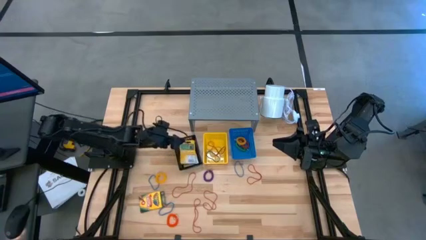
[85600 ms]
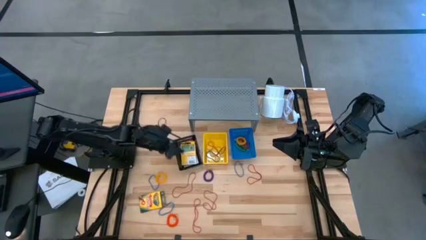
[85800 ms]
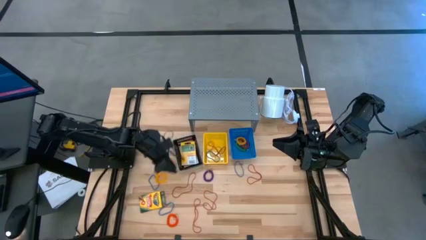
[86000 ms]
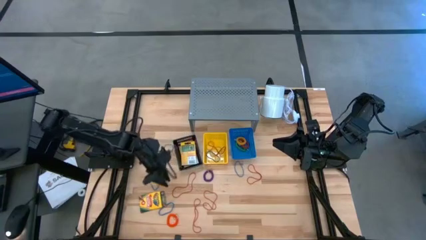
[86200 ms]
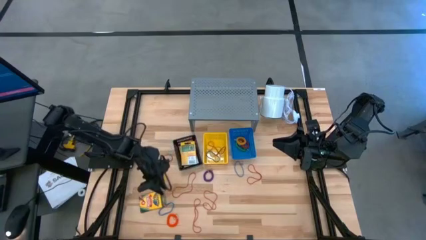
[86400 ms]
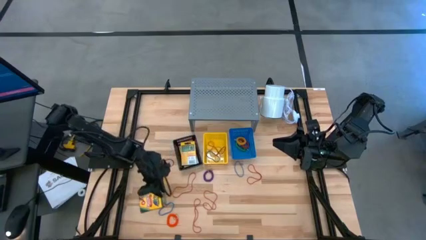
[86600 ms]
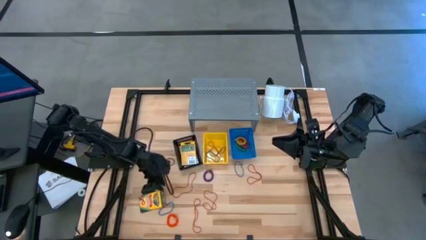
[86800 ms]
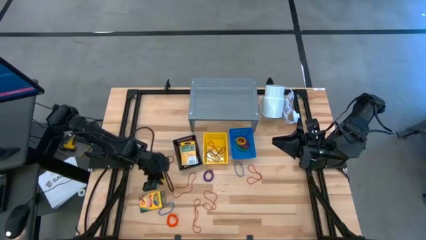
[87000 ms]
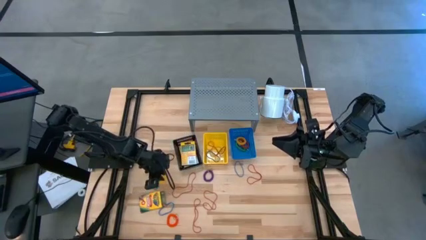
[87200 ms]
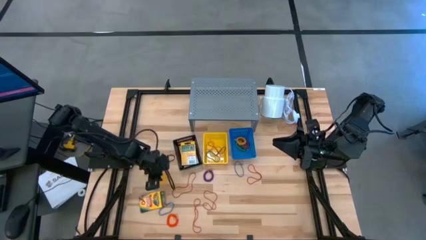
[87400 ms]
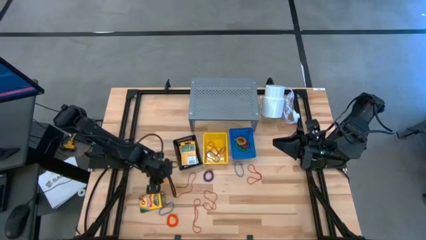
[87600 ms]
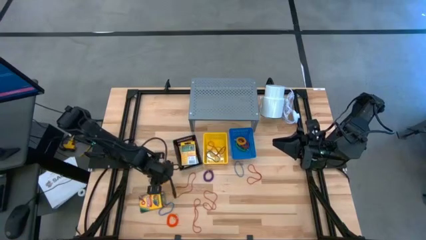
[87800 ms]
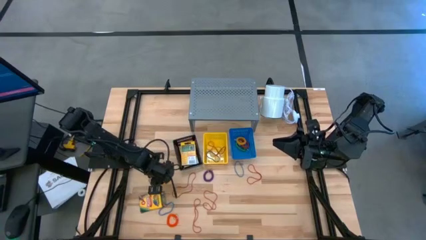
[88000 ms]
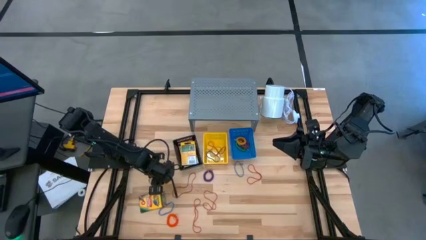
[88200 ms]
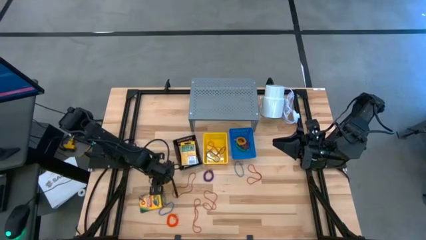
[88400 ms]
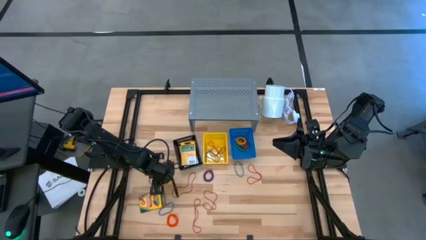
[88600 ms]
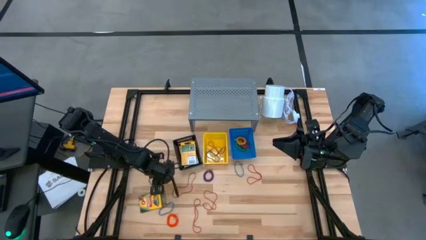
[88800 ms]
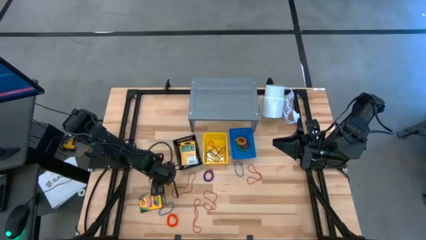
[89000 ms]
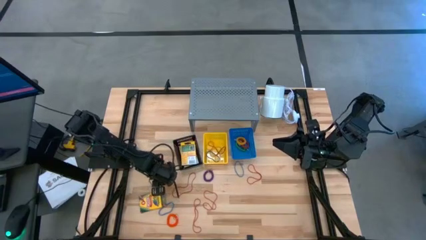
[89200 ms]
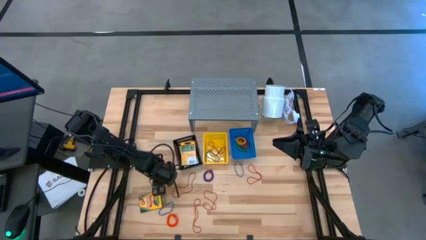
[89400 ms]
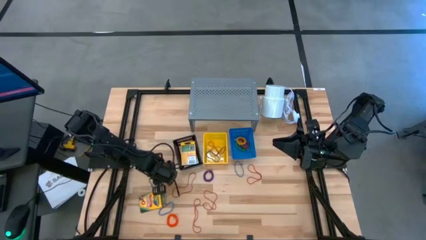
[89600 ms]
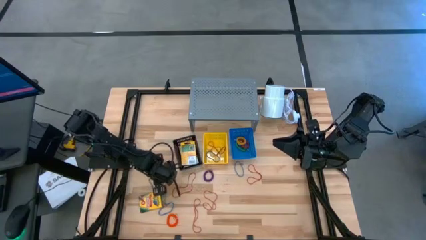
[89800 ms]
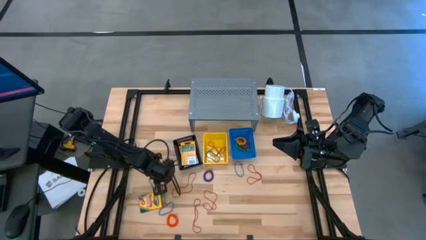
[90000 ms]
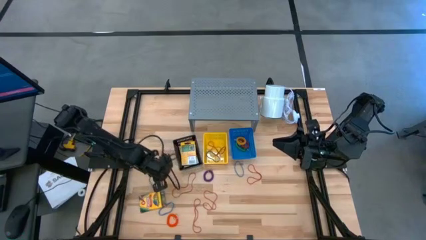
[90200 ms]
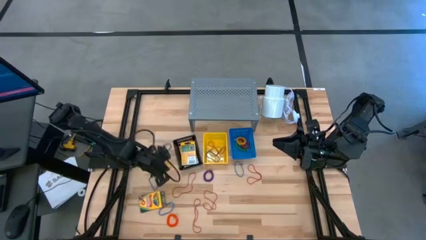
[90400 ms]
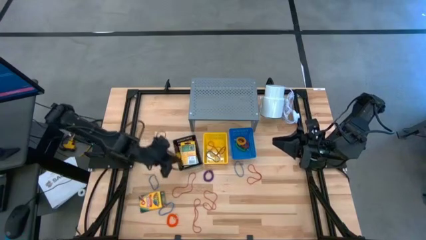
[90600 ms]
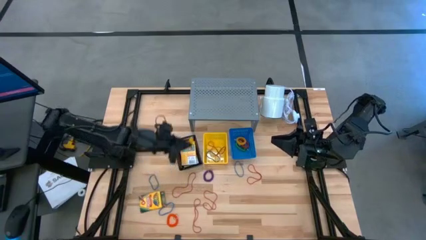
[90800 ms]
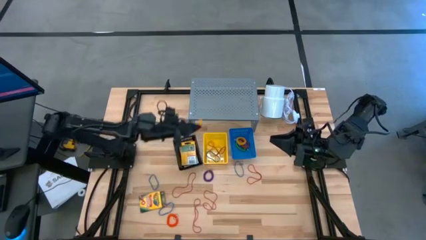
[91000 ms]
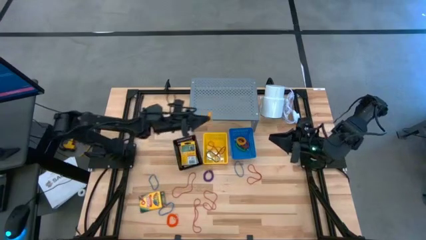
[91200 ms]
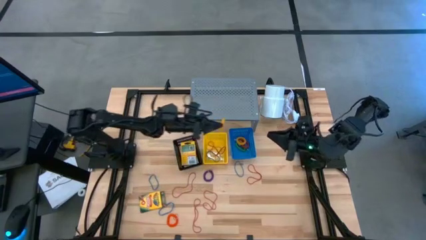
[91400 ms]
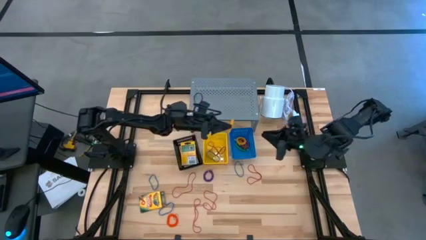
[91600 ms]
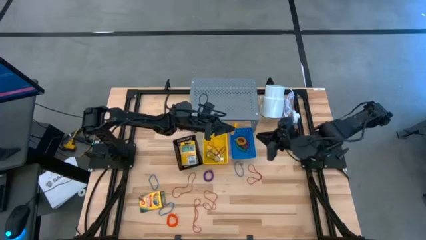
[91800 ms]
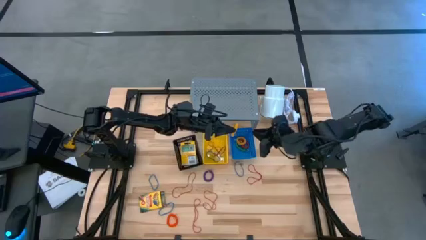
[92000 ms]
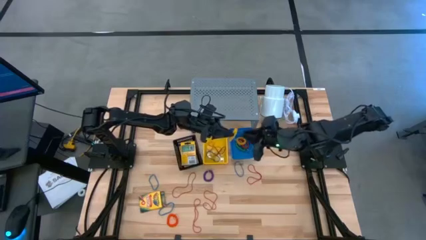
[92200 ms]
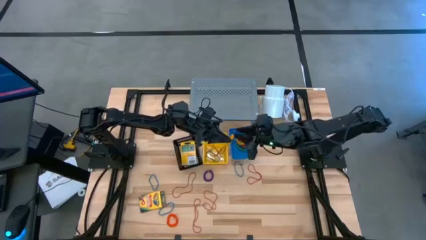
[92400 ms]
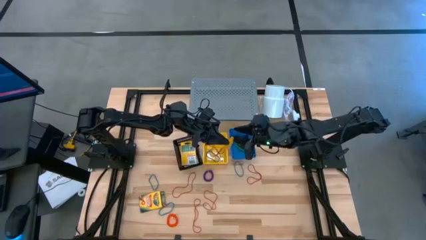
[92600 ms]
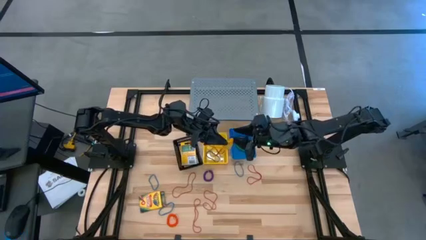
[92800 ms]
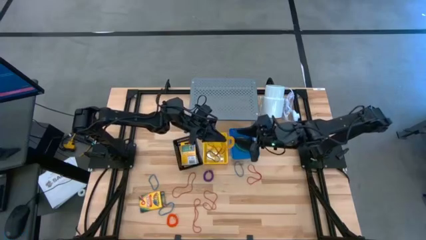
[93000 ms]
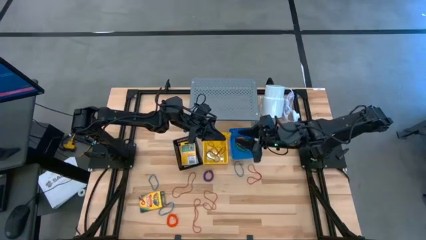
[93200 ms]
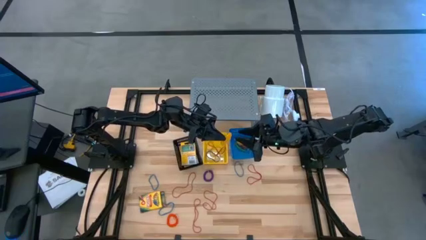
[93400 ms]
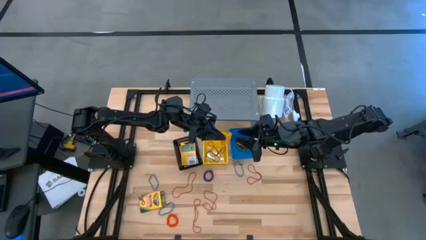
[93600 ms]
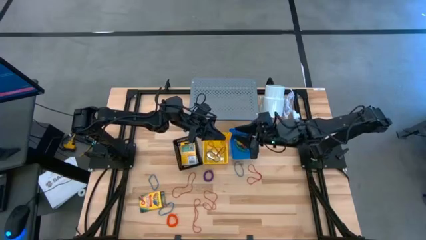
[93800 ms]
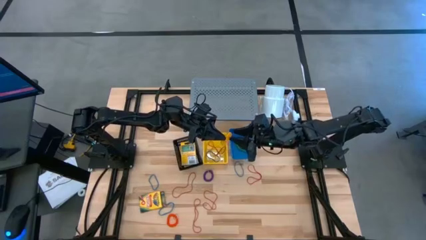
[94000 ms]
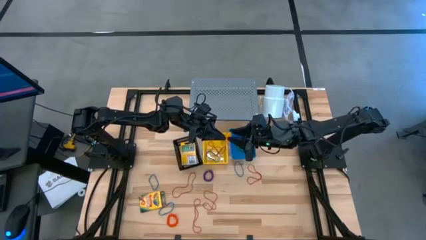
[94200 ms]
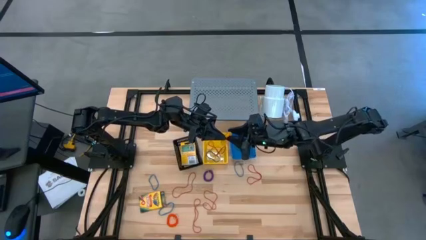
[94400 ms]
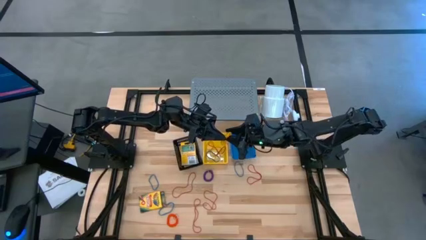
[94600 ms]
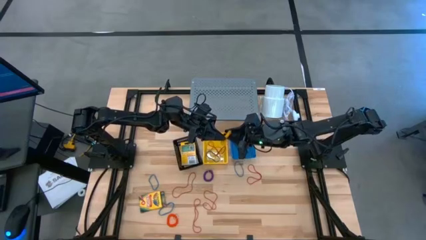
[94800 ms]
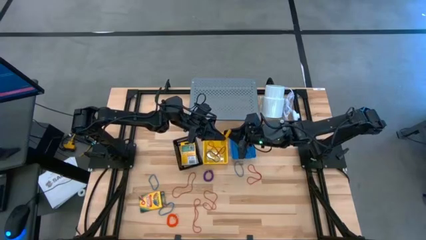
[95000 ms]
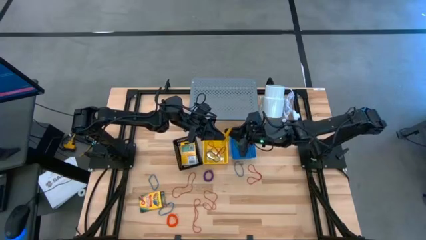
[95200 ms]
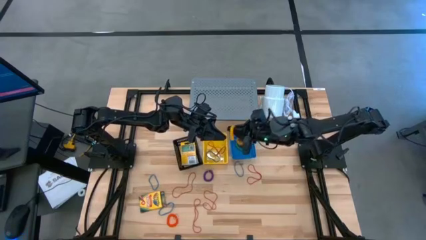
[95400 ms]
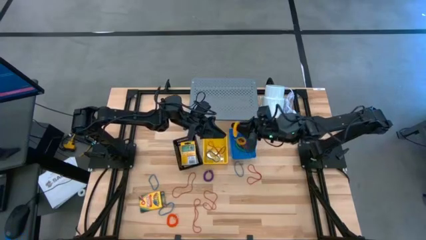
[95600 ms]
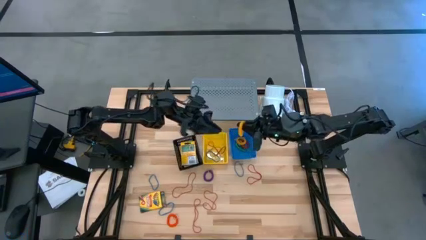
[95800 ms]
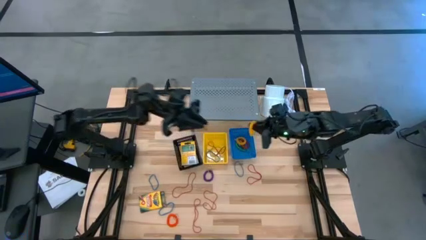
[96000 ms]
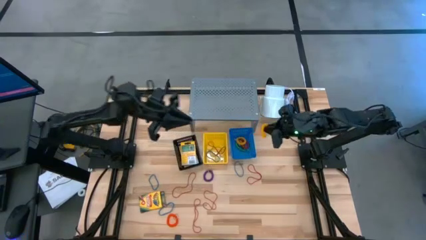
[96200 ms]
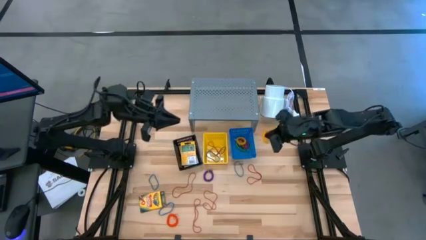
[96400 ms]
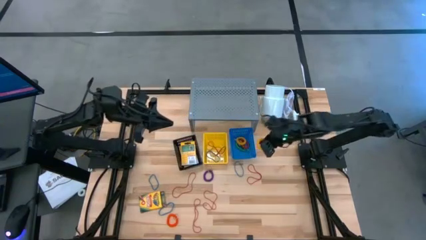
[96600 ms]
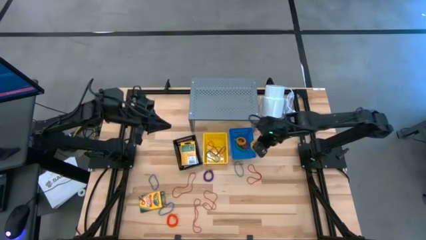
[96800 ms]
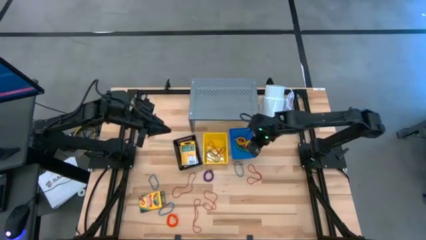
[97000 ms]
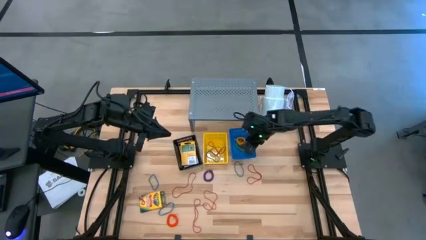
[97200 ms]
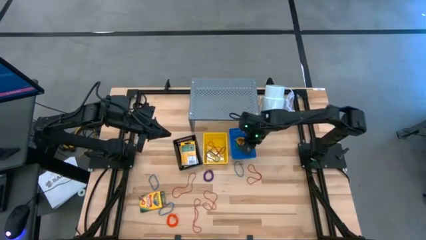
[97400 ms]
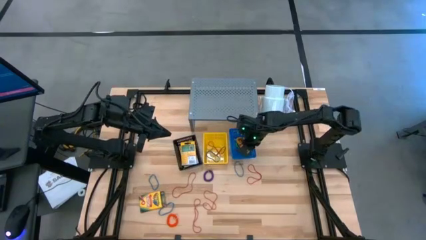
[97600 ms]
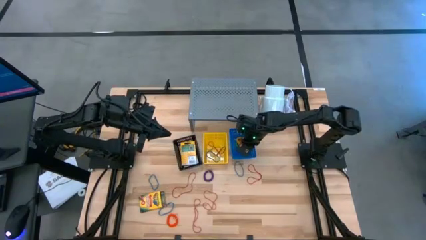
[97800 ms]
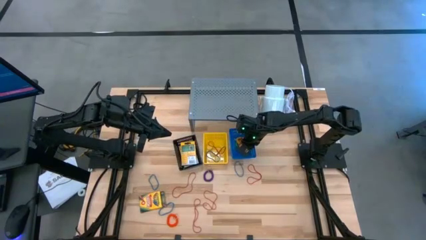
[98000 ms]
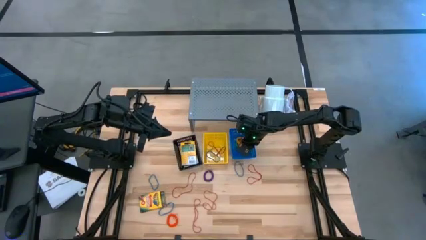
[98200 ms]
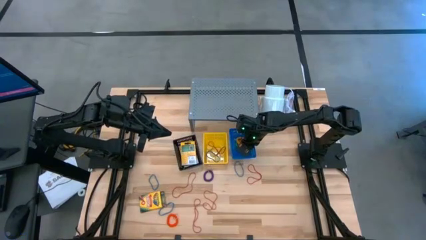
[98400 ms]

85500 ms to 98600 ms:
Task: Pick & Place Office Desk Supplies
Put the yellow spring keychain into the blue basket

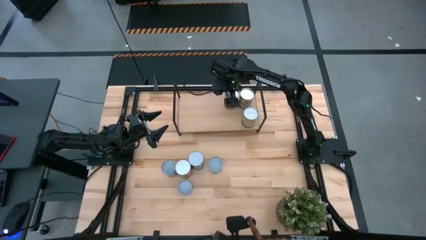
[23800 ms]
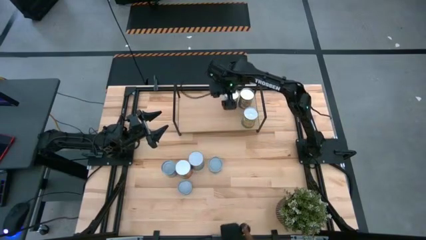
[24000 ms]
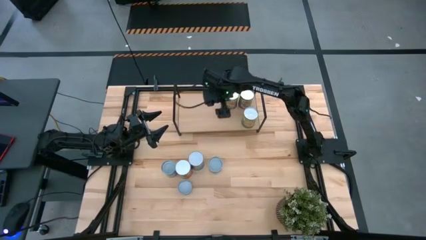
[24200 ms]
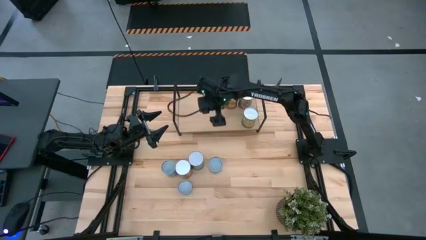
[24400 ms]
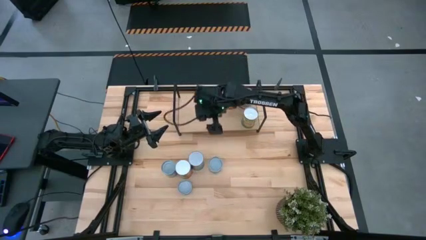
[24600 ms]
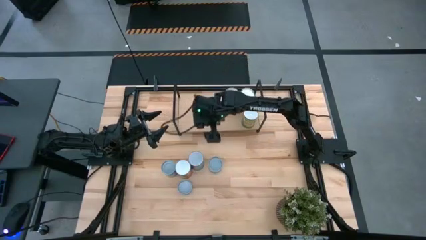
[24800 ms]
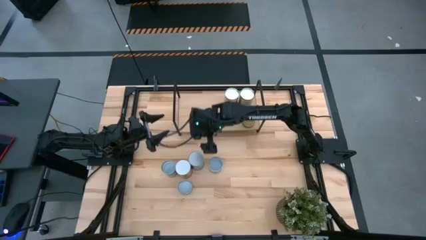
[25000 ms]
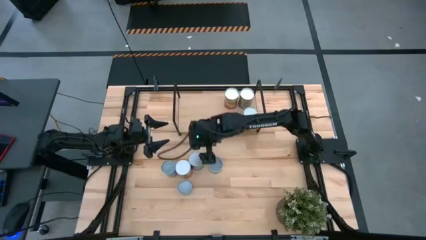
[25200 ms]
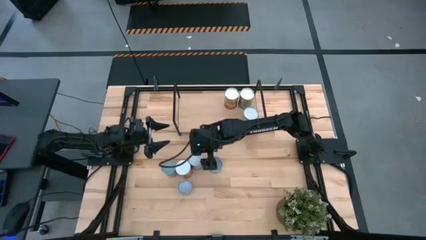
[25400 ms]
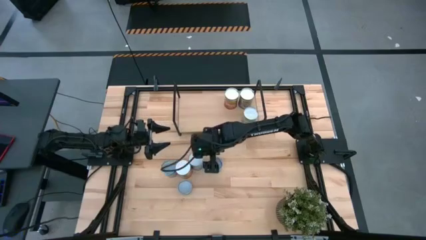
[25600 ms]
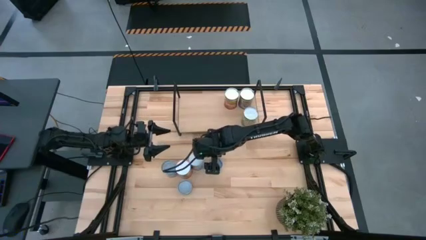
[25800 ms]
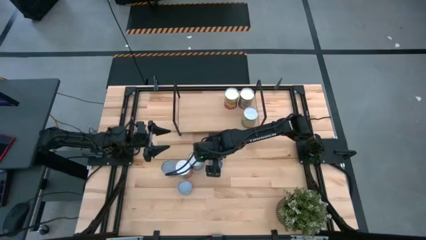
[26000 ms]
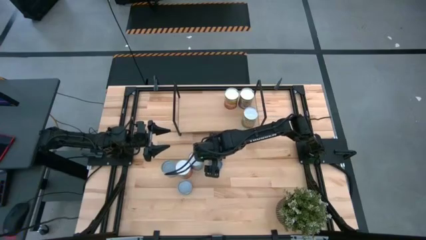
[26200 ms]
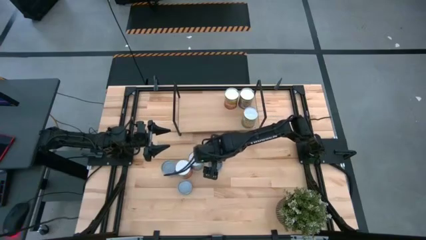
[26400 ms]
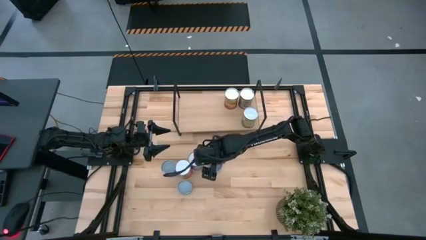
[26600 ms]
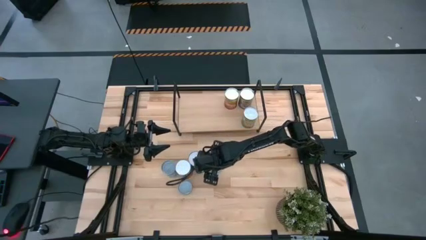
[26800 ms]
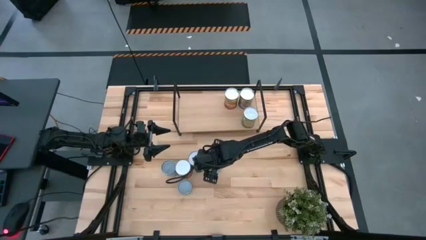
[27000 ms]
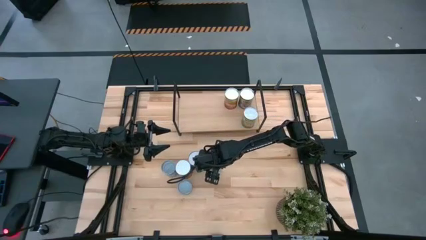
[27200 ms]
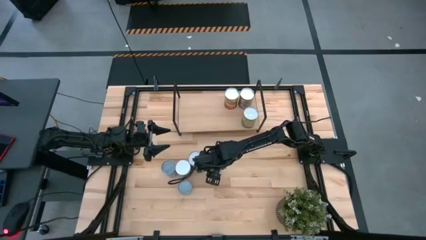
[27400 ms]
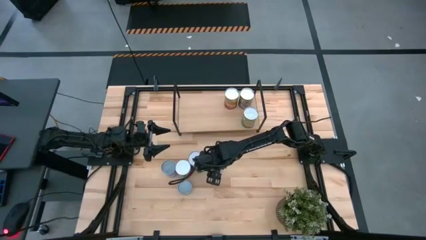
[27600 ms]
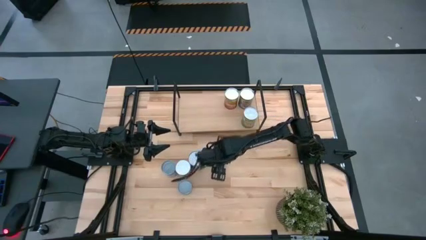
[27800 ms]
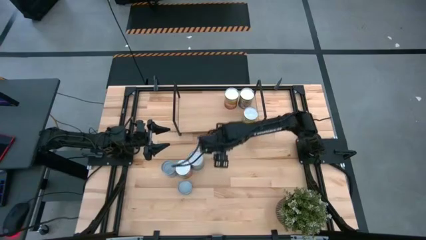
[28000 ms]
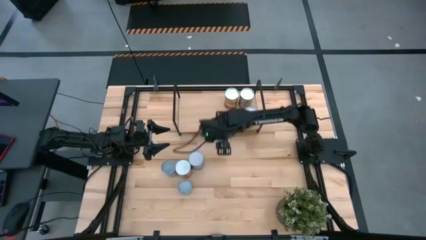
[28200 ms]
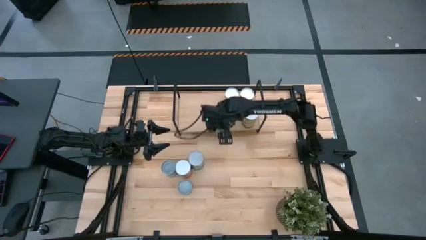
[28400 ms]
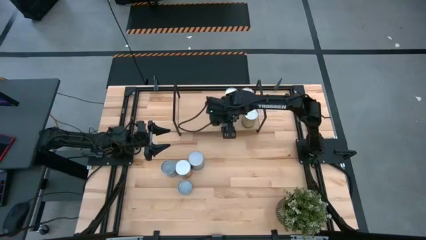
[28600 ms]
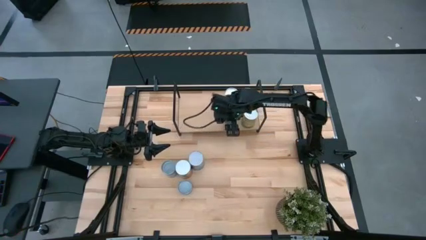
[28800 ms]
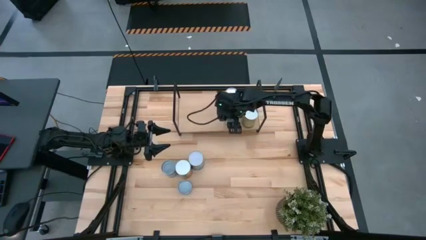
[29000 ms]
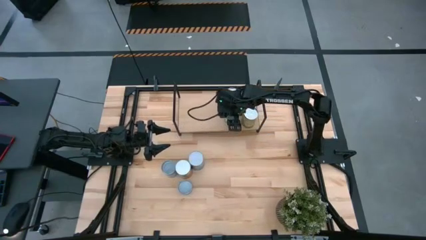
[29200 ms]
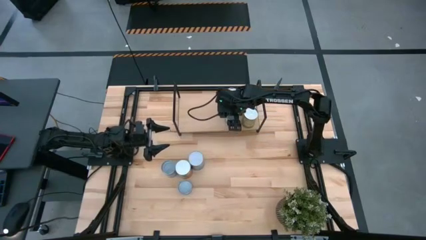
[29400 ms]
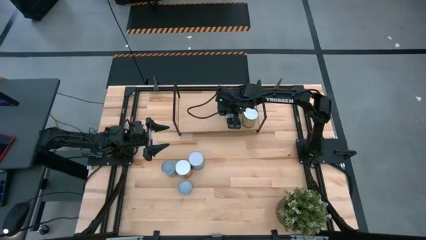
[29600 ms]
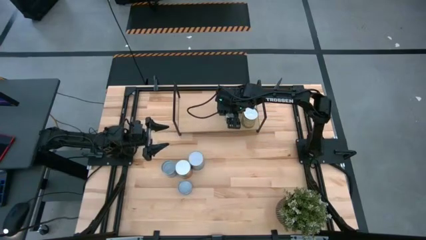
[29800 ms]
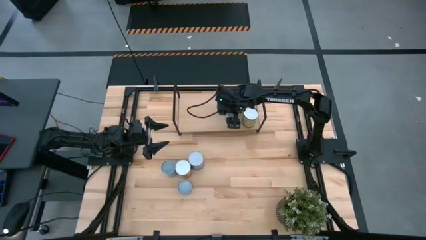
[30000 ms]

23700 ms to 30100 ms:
Task: Pick and place cans onto a shelf
Put the canned vegetables on the shelf
